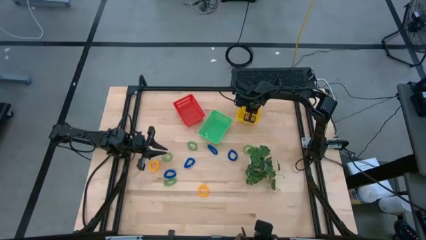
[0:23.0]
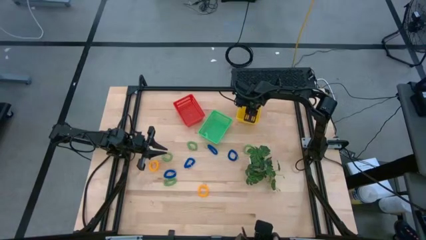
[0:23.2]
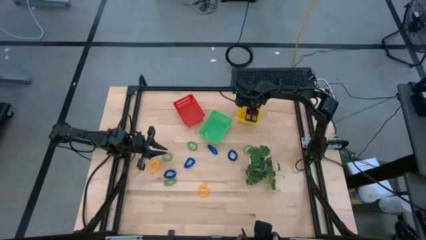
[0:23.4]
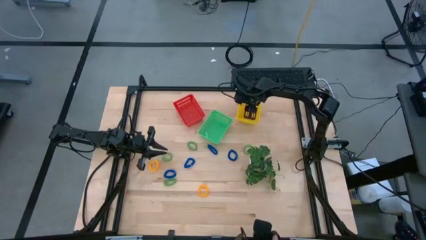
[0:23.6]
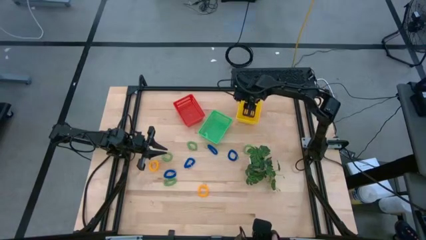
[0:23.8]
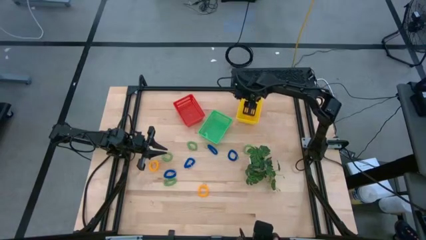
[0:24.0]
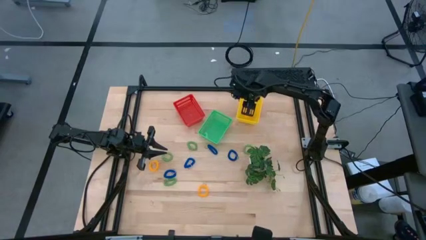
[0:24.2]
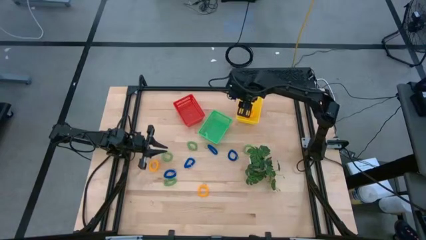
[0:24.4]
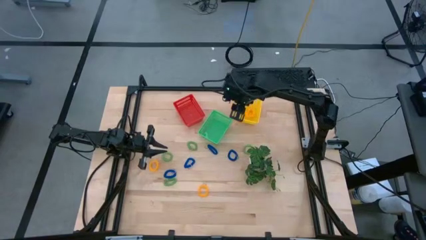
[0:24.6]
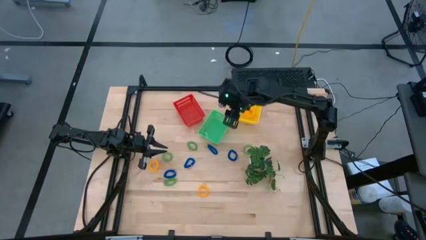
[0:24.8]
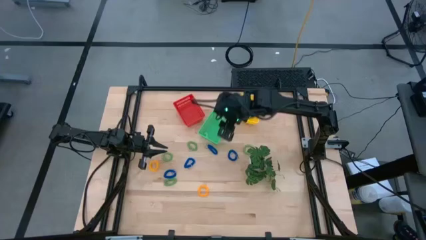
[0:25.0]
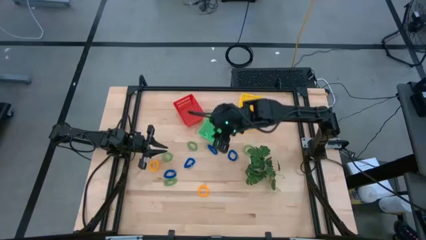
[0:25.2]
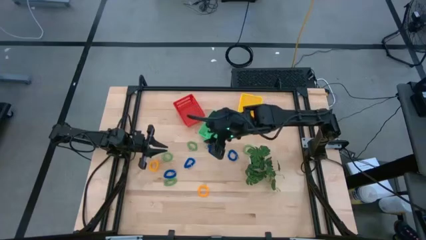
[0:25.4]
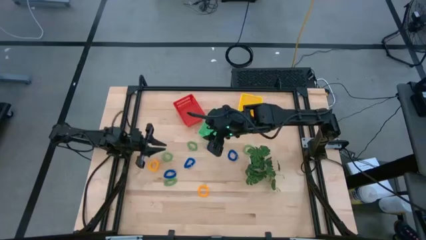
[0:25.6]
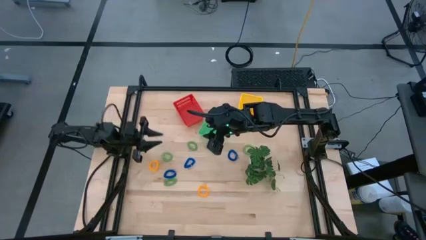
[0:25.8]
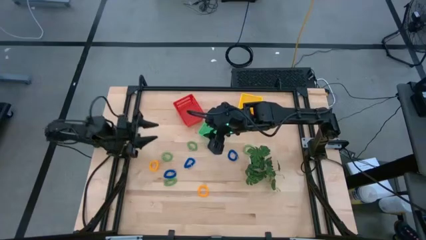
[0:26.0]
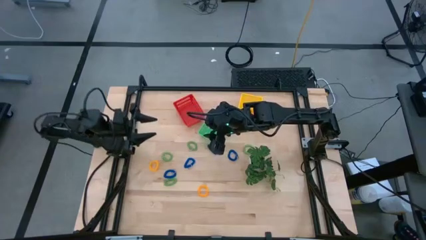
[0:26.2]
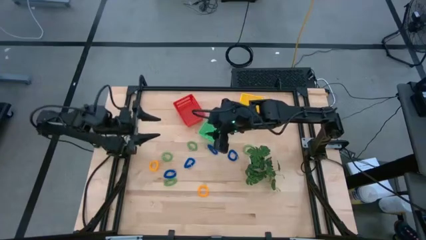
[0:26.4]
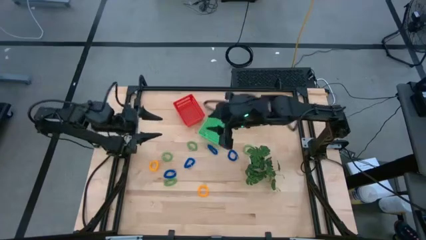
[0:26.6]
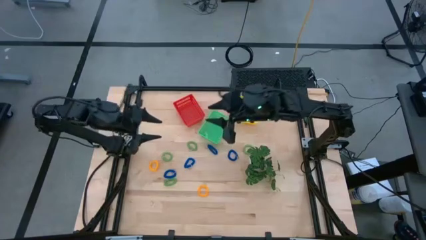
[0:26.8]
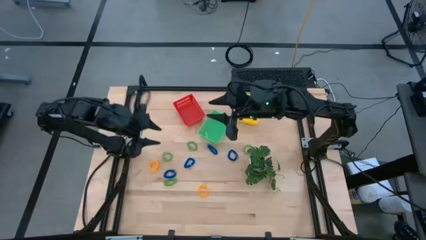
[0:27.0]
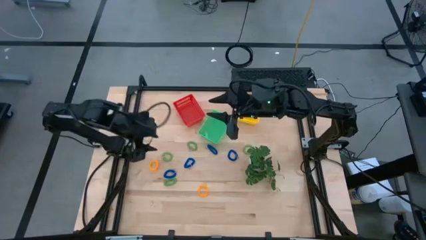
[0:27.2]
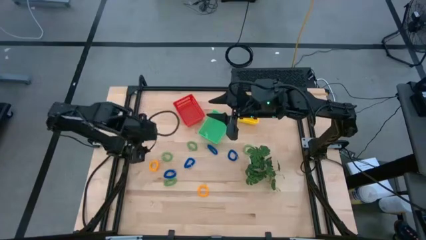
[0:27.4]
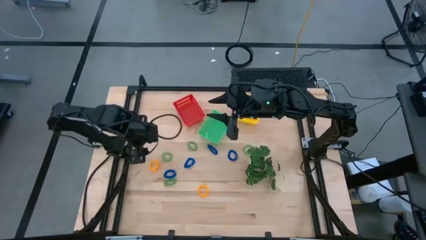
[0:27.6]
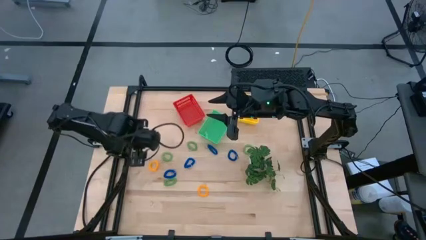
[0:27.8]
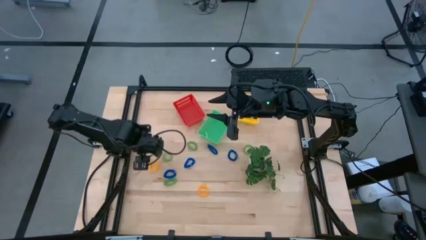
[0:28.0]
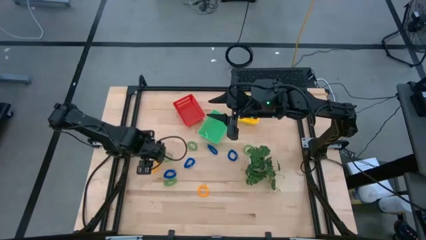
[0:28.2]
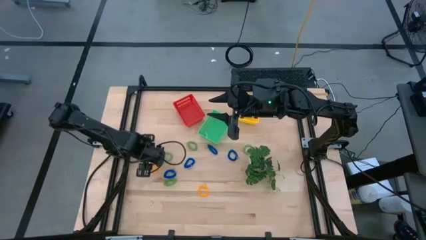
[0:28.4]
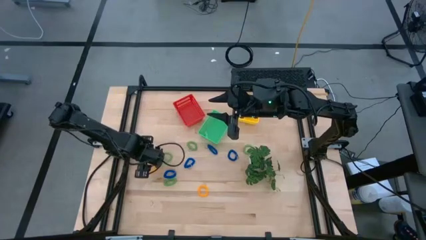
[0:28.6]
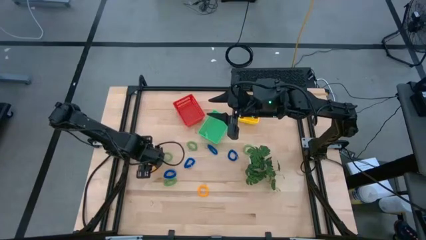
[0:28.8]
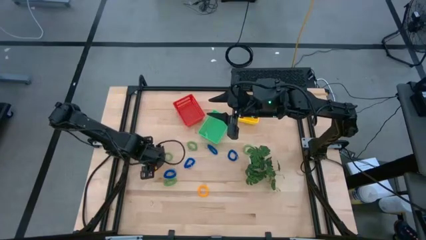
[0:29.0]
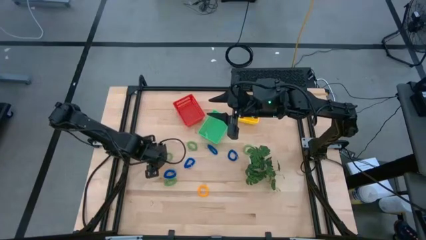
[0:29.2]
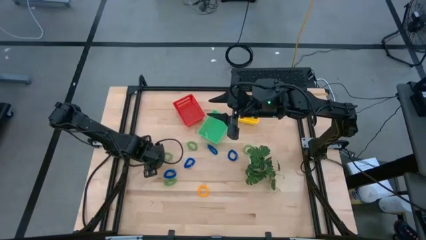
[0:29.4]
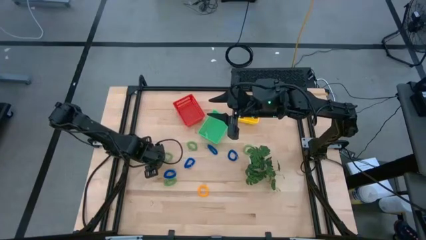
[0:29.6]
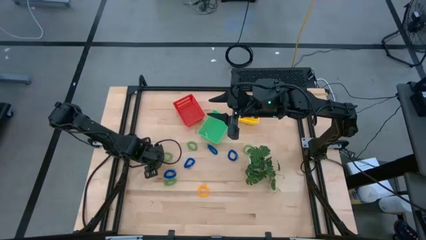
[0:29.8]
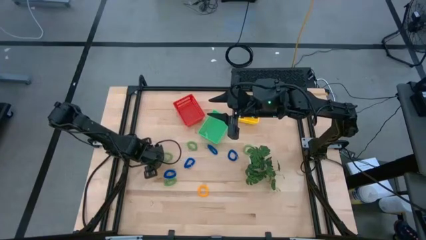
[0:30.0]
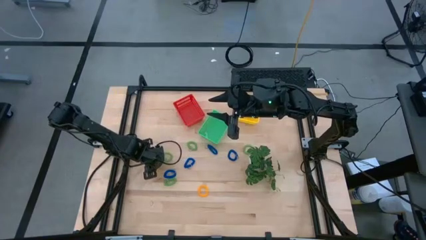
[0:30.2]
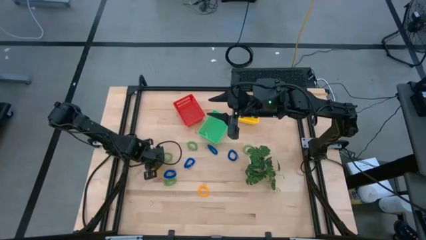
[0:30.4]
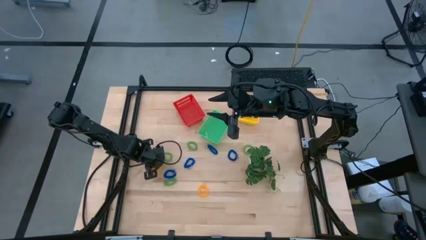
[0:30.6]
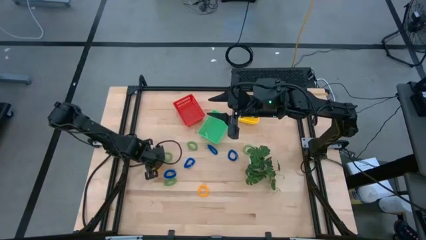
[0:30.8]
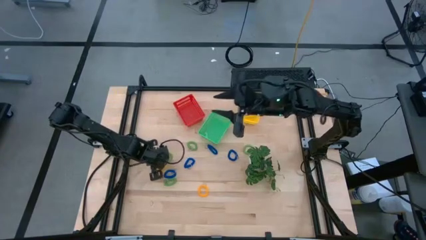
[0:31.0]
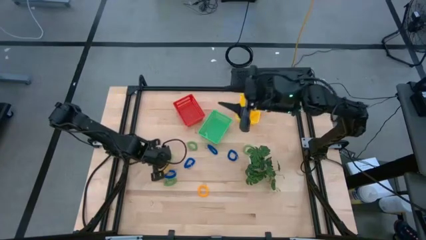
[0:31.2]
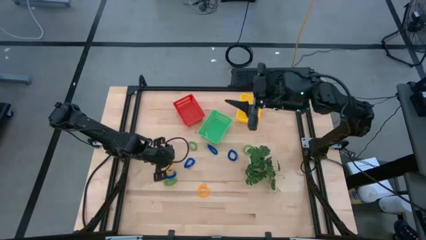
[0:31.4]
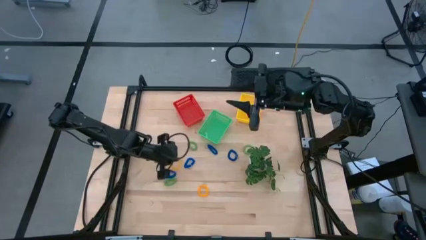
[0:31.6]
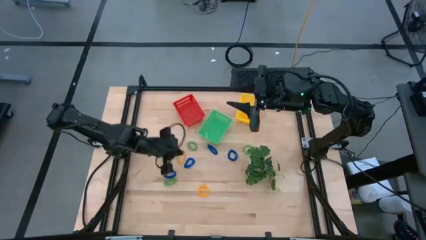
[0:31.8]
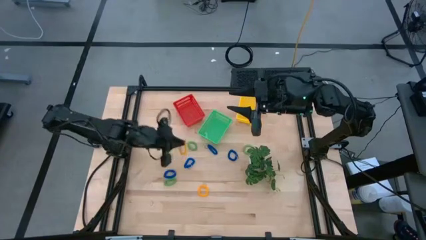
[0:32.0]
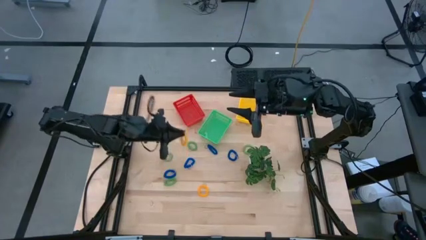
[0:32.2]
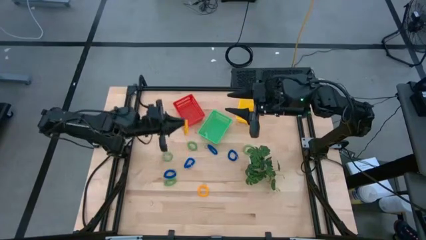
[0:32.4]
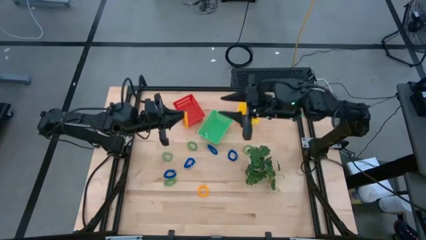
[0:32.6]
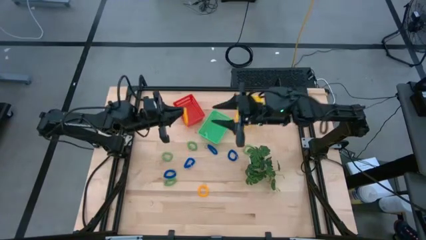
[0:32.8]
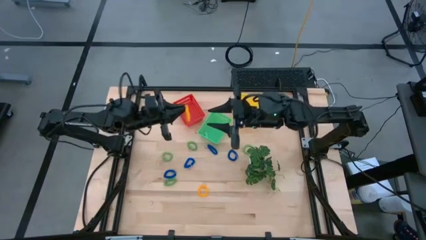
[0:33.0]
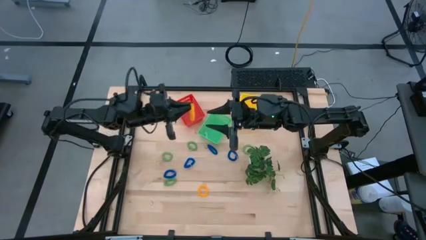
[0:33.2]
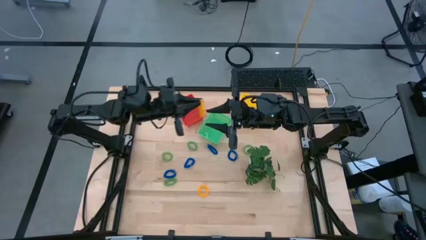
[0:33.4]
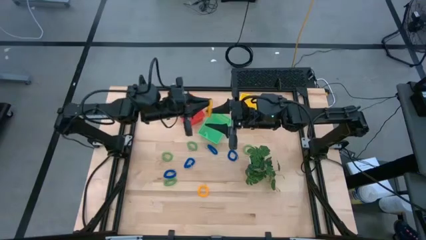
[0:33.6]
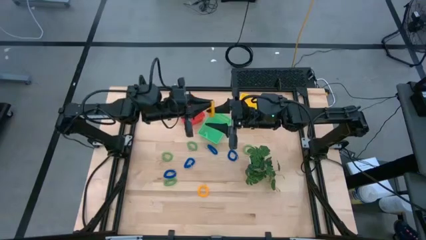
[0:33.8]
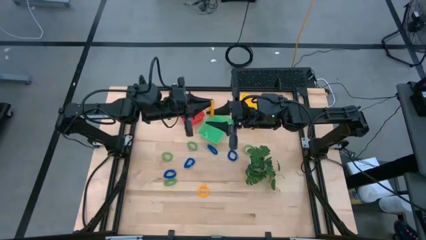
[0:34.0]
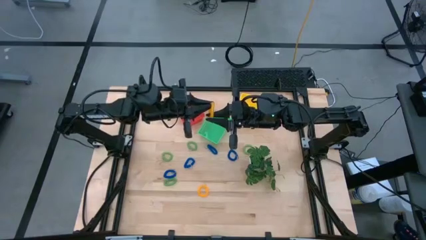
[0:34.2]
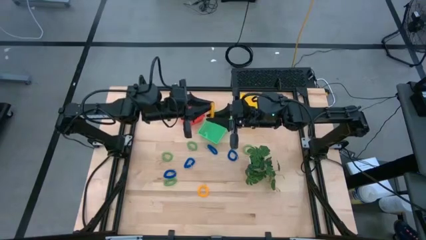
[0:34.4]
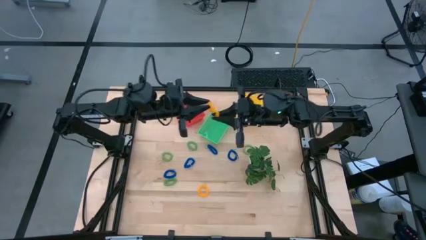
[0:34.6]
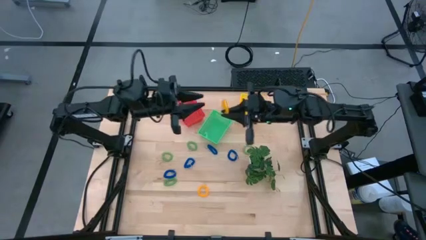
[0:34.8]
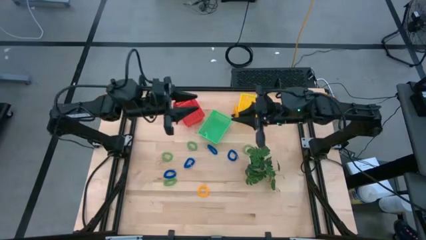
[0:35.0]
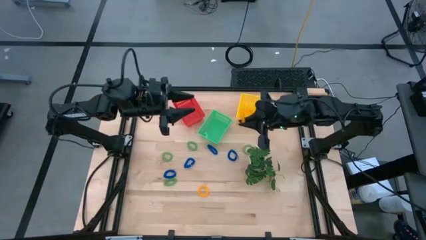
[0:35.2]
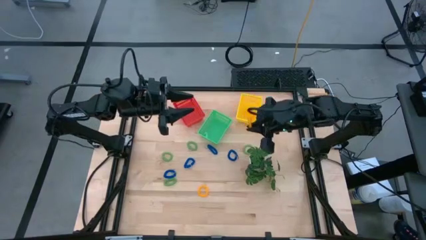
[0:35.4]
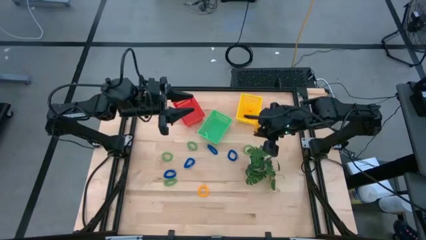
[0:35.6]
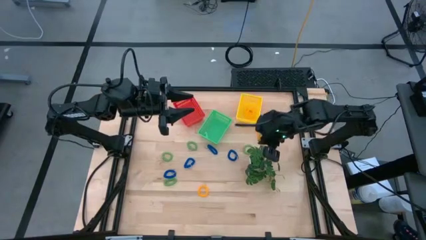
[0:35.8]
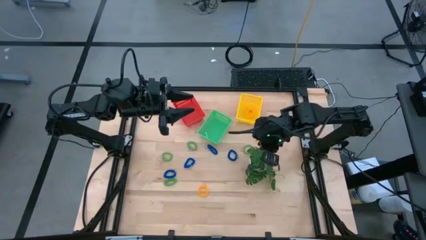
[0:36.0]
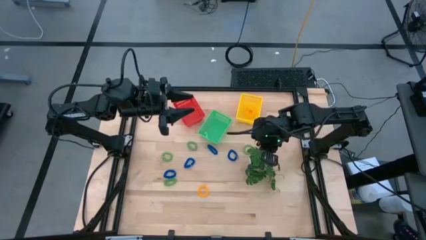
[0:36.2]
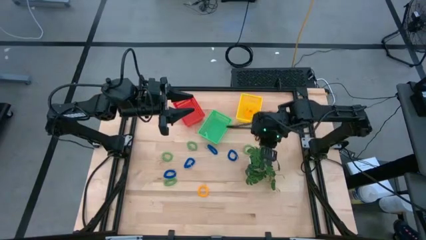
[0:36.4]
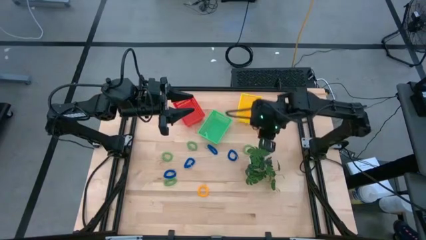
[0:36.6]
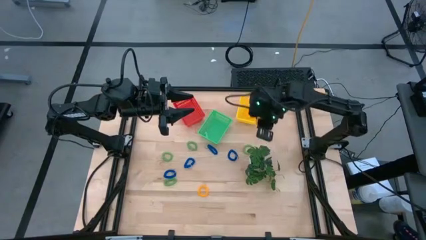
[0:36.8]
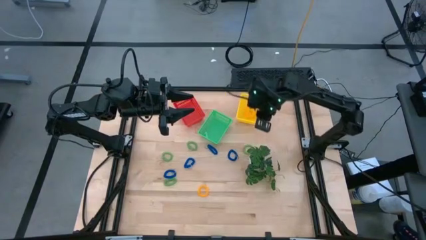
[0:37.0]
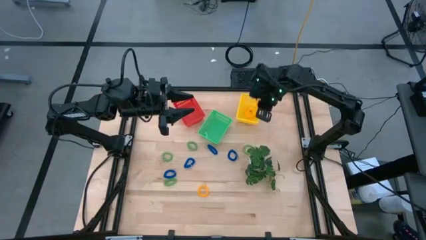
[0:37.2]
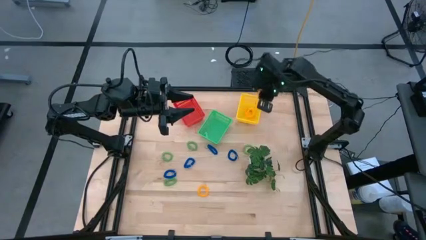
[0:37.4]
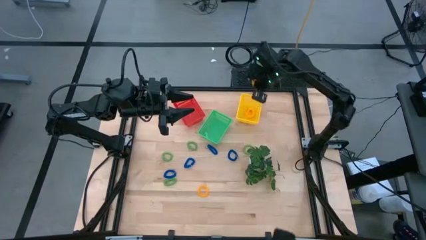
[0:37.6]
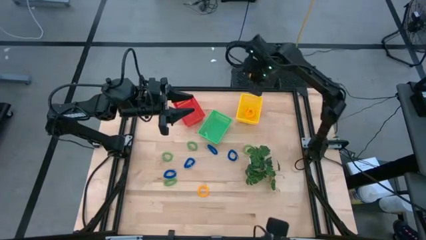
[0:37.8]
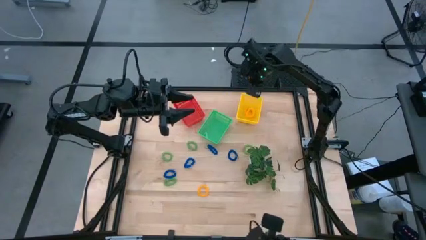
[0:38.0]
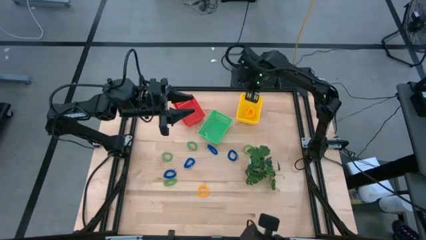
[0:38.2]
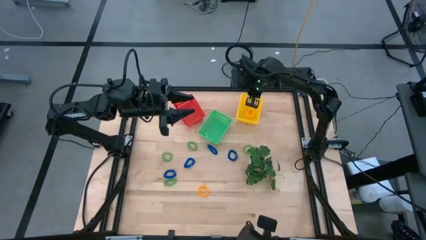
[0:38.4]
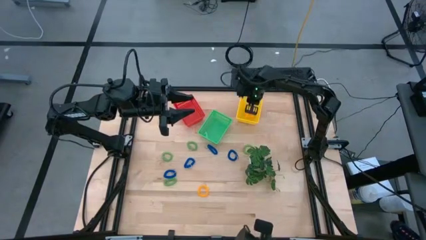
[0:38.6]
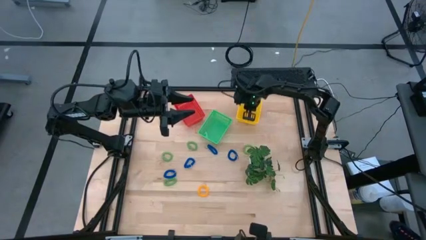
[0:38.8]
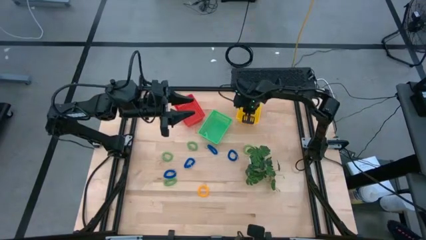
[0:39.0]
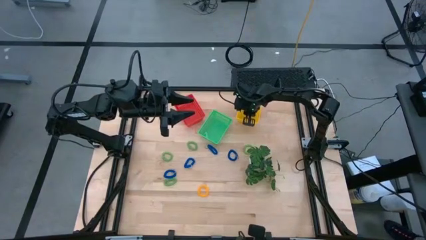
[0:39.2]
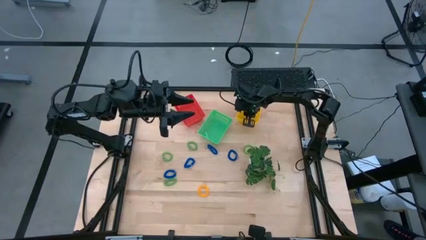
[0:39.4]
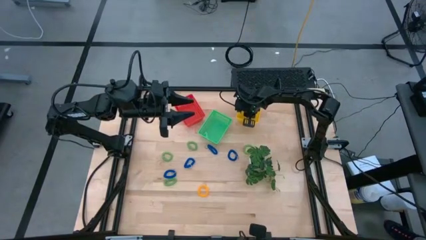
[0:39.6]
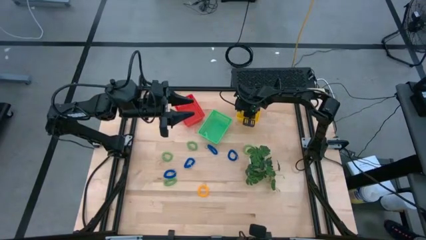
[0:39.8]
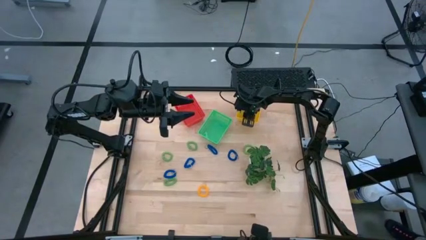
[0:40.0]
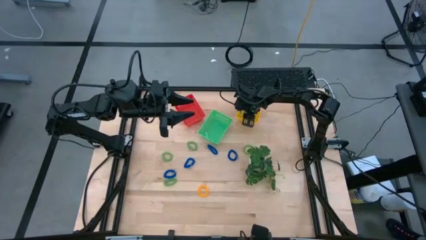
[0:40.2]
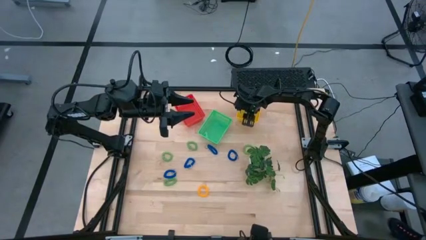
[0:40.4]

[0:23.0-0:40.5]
Task: Sort spring keychains
Put the yellow spring keychain into the yellow bin
